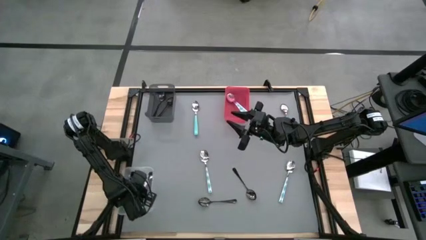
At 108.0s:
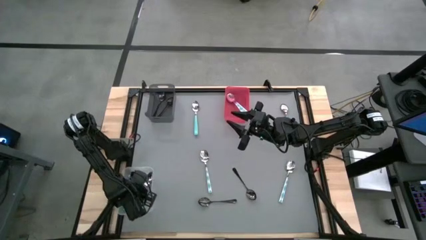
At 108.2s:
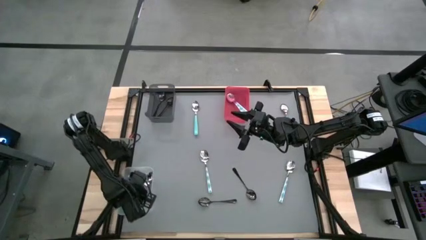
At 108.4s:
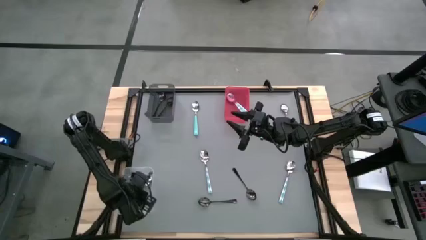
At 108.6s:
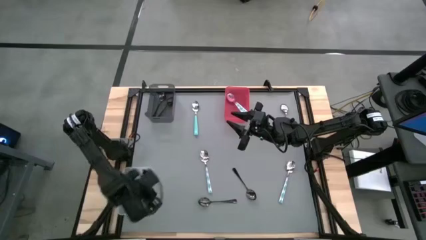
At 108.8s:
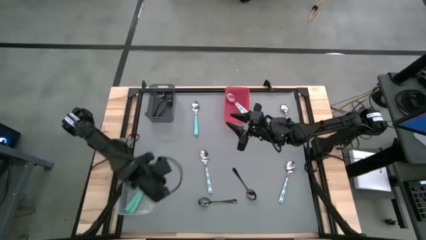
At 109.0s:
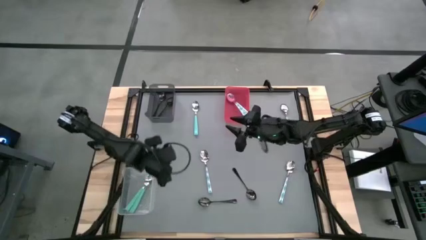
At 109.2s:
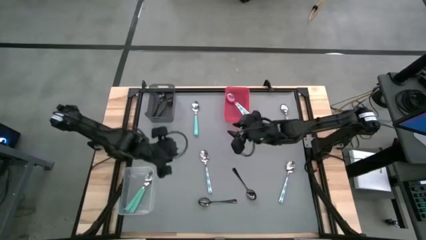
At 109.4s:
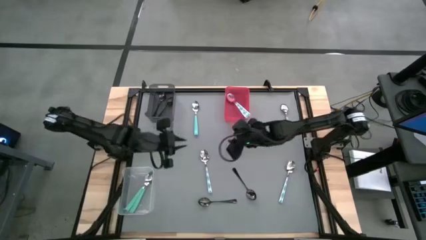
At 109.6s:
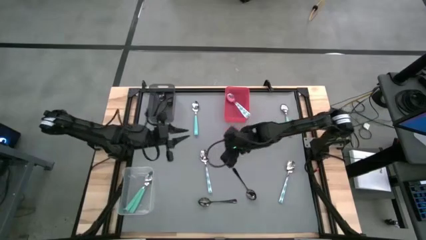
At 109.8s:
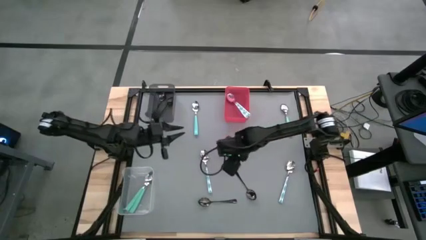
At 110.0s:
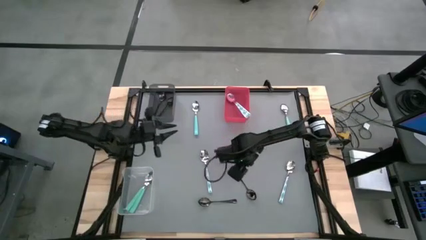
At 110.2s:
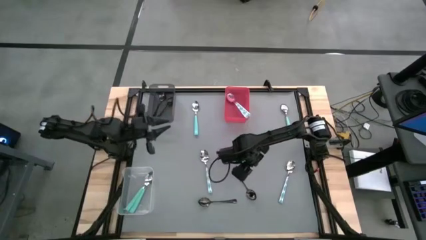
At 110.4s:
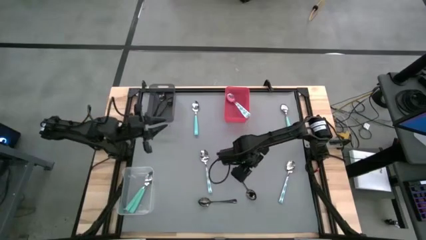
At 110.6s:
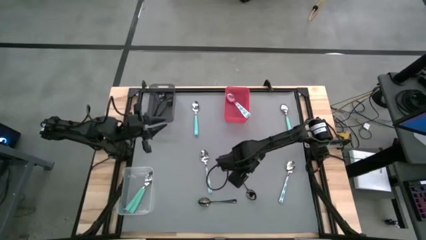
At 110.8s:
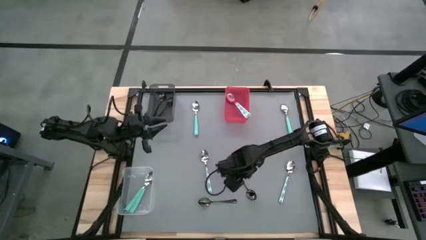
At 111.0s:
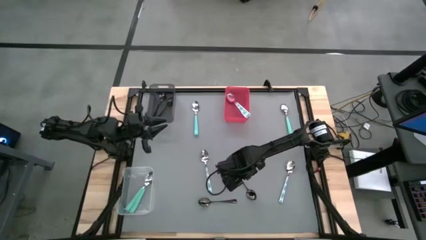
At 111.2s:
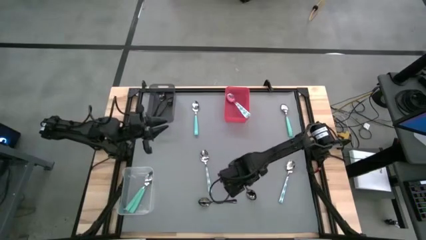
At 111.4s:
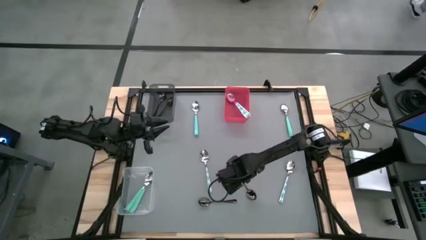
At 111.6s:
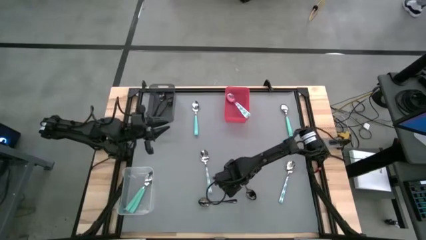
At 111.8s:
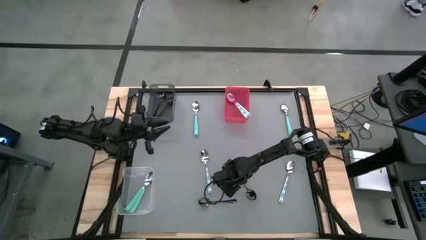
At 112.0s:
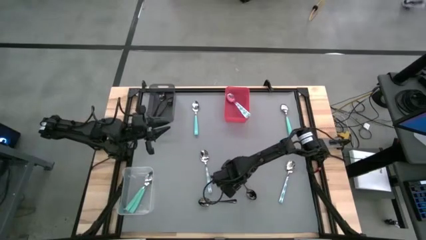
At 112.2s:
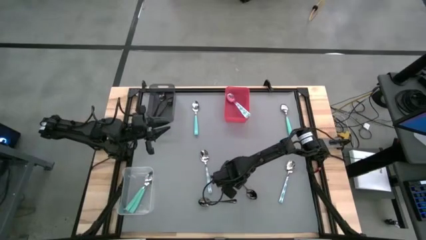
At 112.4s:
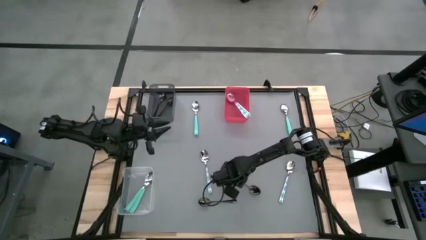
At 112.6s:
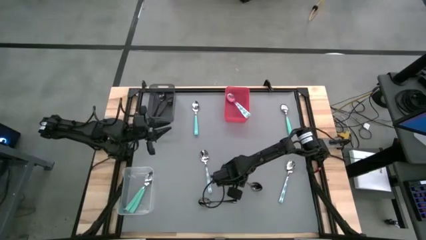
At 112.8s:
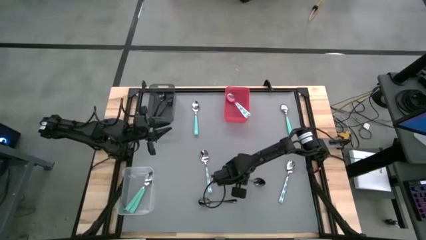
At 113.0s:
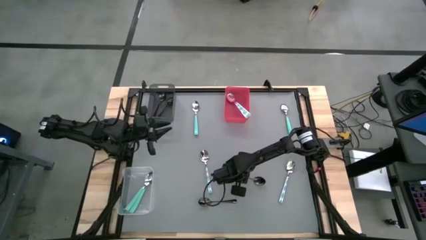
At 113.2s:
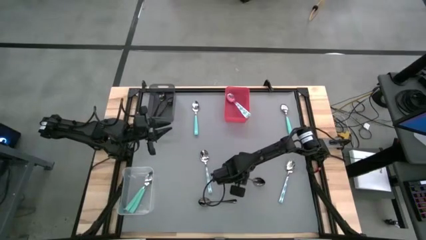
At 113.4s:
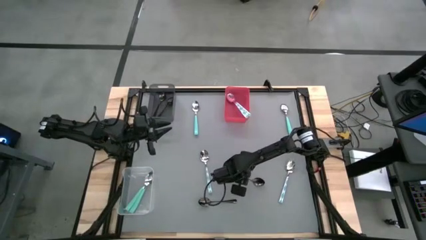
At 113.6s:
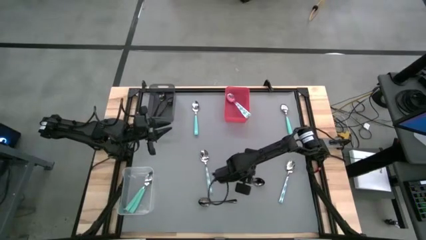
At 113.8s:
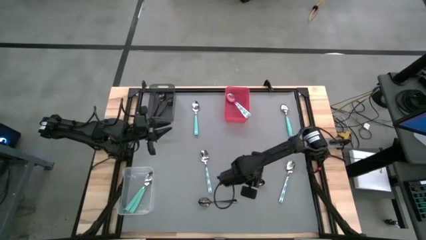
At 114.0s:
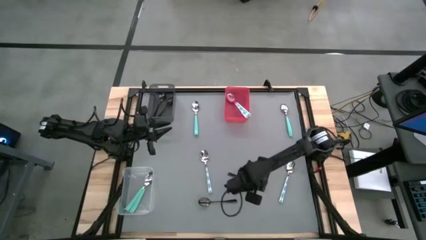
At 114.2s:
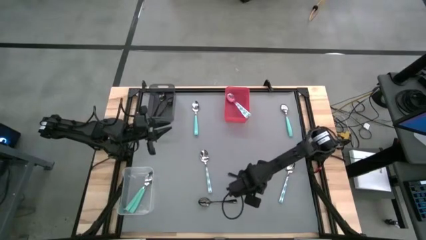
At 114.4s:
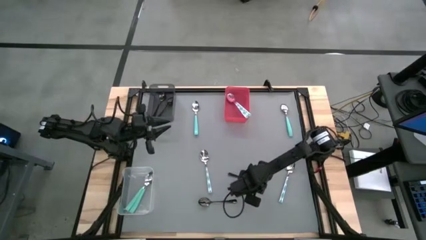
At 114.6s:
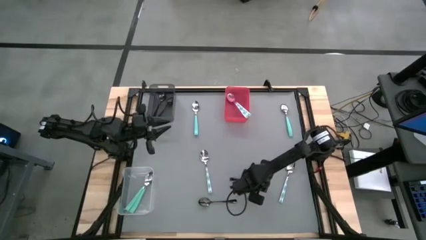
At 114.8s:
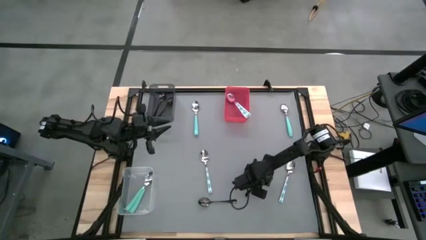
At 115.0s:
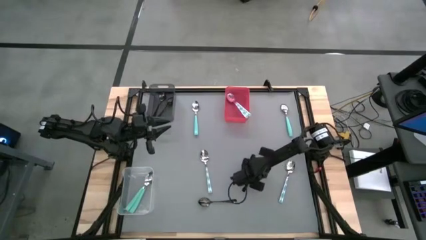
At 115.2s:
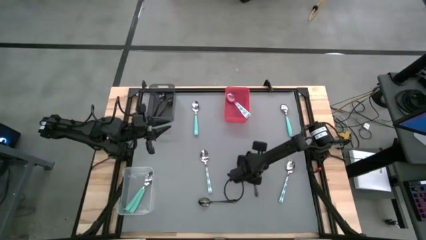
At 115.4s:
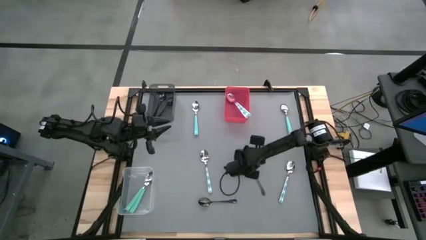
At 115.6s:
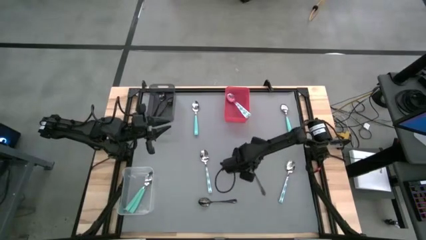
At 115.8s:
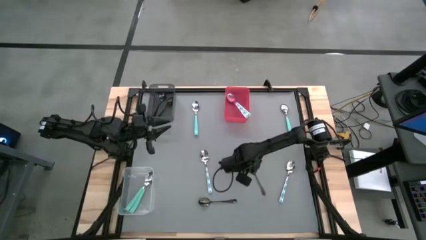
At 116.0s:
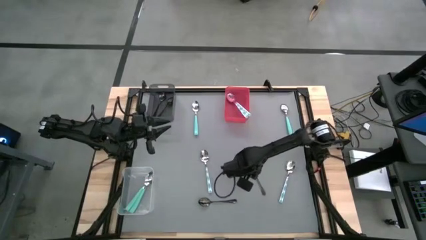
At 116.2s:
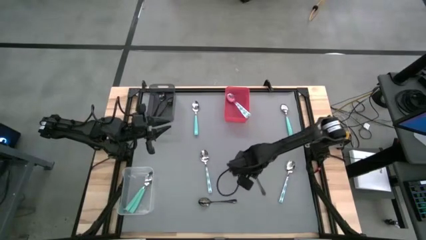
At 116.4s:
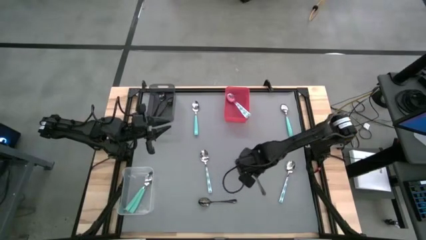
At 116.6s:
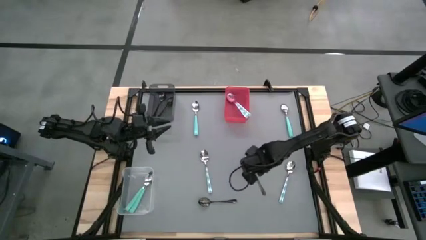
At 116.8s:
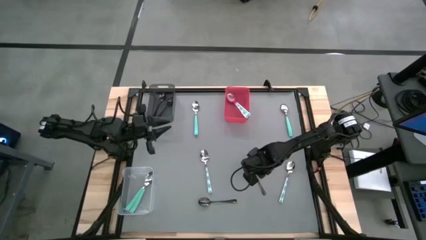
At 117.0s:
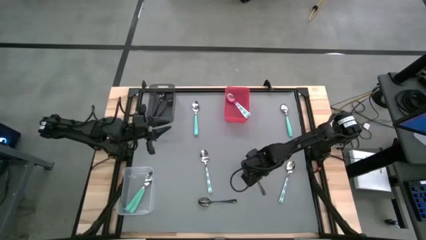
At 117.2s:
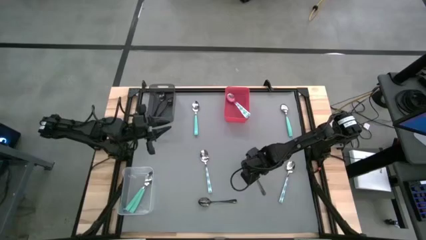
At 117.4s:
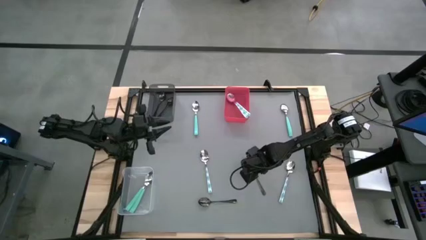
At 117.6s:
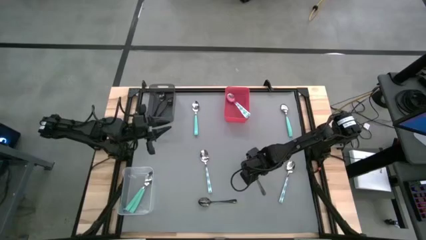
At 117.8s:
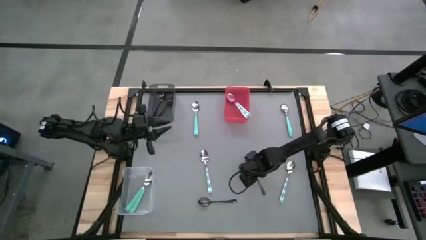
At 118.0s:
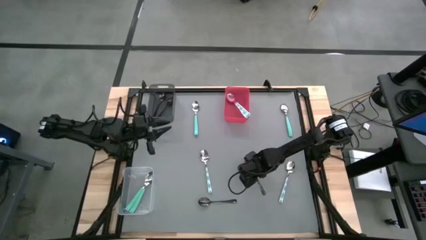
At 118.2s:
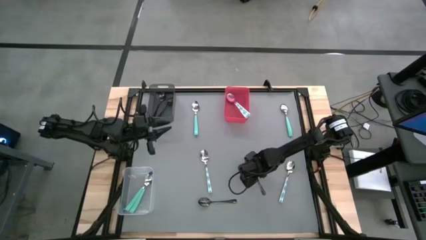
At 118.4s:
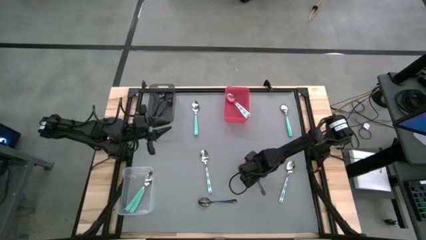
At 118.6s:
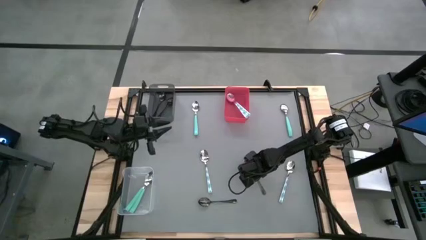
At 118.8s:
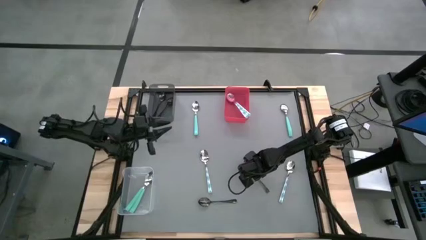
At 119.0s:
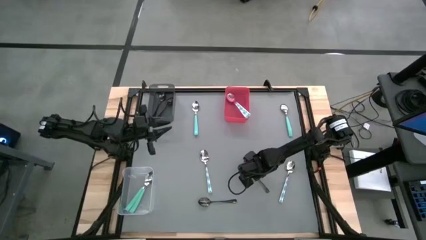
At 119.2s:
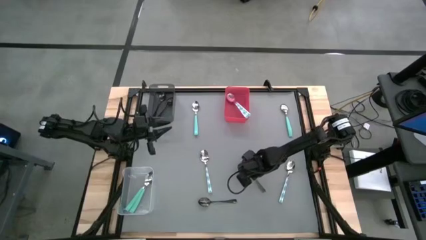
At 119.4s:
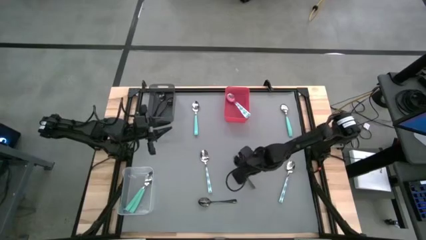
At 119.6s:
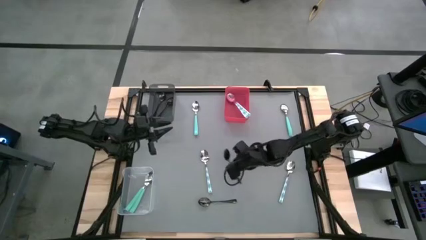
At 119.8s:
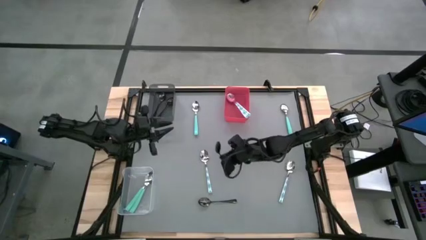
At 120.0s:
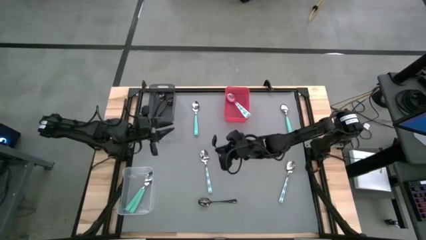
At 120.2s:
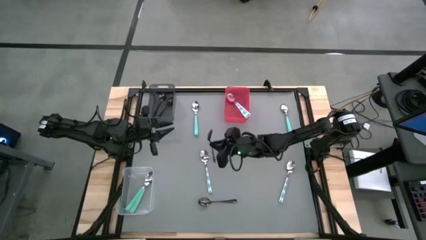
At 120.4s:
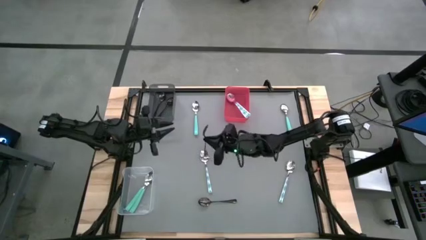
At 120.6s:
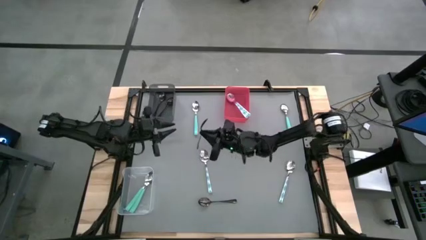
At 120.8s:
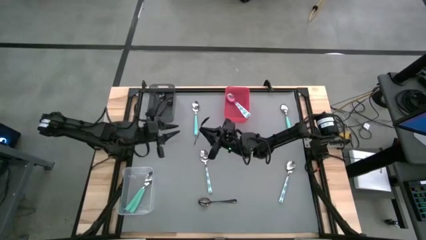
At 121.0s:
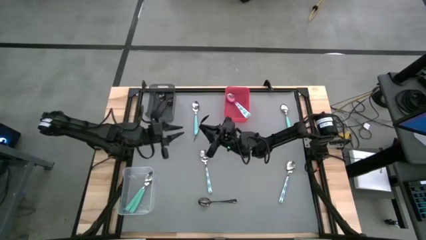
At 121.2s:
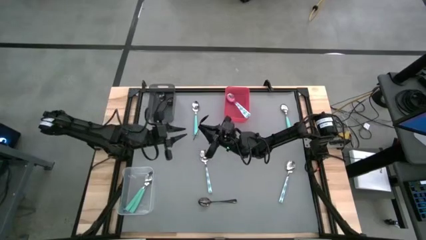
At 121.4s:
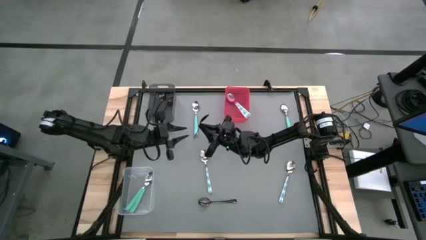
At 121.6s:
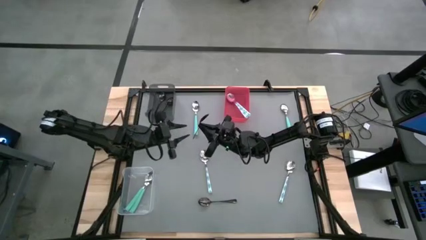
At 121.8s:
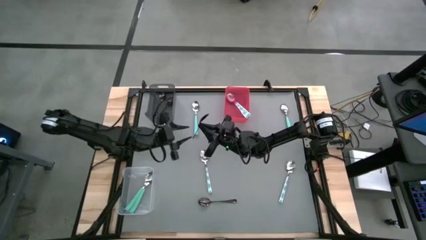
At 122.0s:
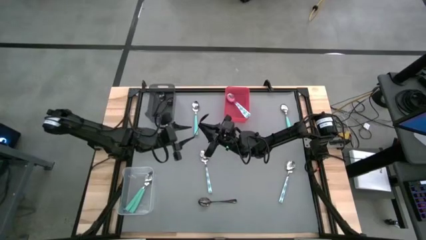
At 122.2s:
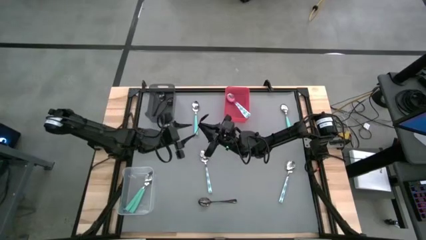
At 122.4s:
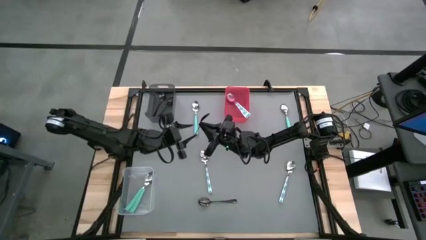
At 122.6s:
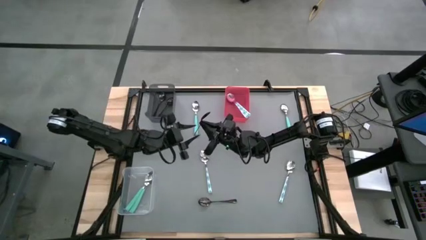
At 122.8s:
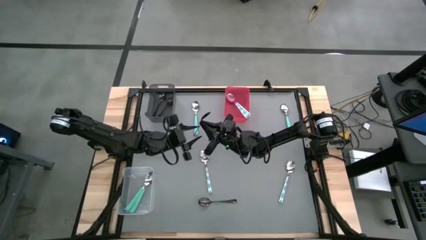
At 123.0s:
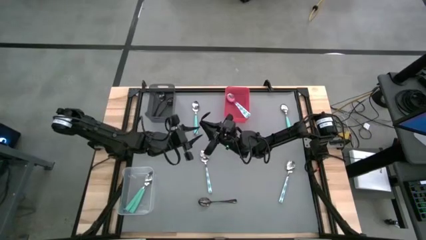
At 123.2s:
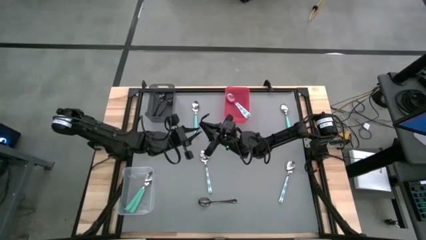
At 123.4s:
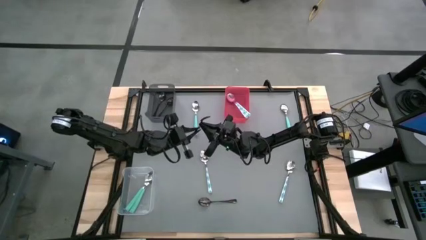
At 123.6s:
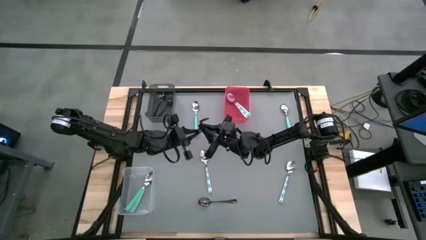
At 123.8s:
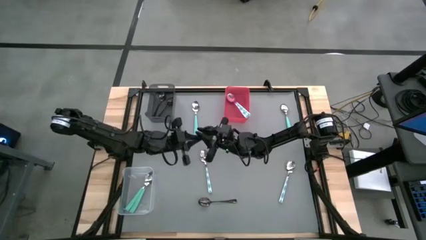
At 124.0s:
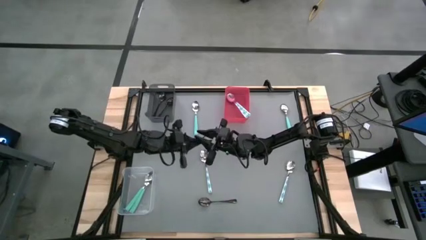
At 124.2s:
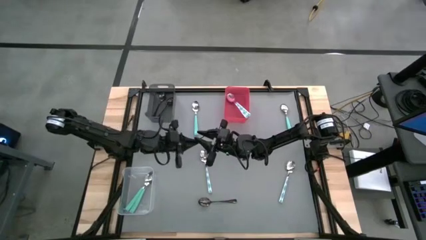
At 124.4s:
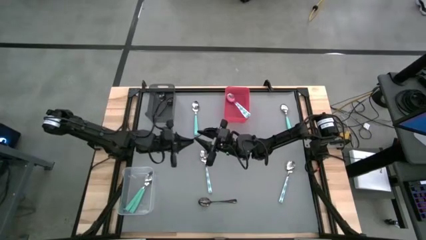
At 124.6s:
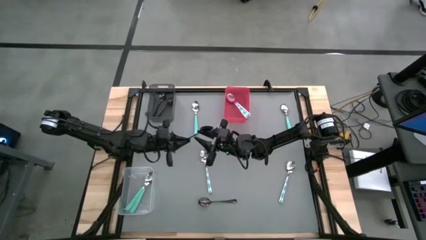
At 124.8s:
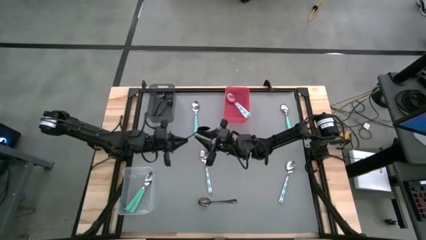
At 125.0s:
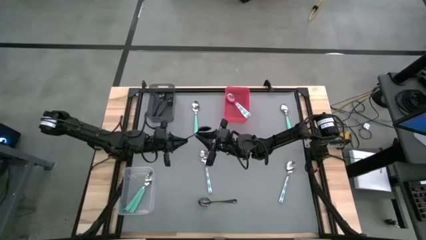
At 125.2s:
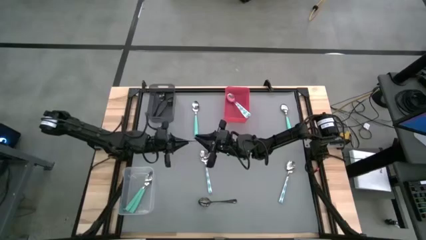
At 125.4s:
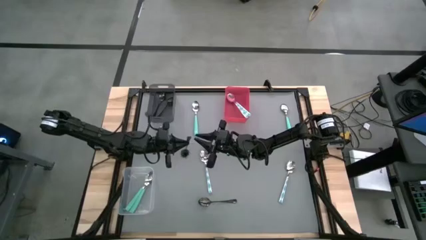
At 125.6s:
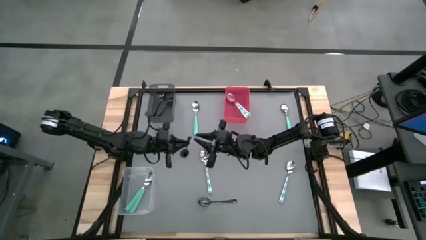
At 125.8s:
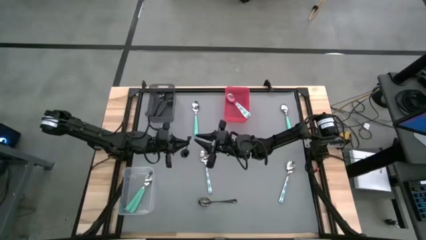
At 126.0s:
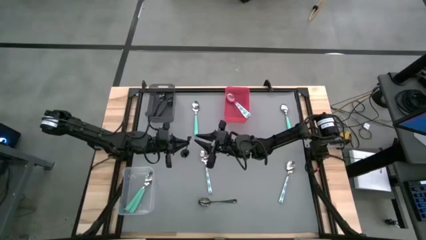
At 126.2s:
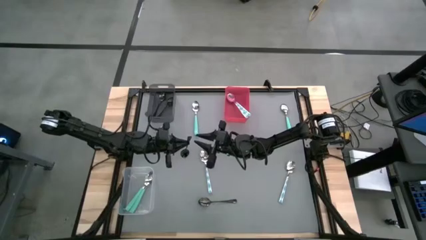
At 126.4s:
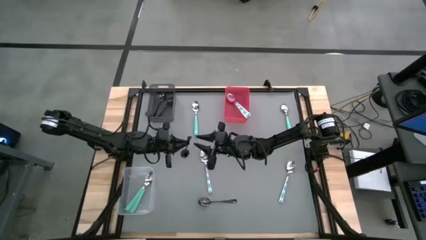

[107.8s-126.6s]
Task: Sort silverware by color (type)
Put the black spoon into the black bin
